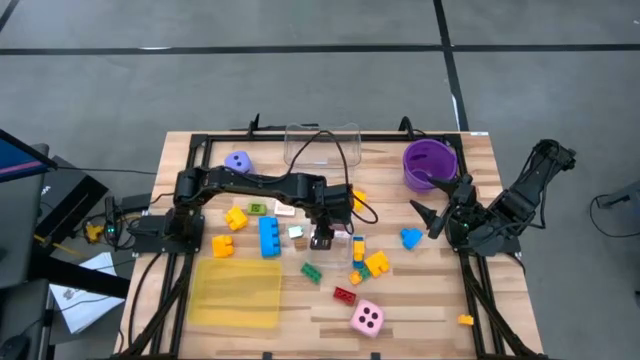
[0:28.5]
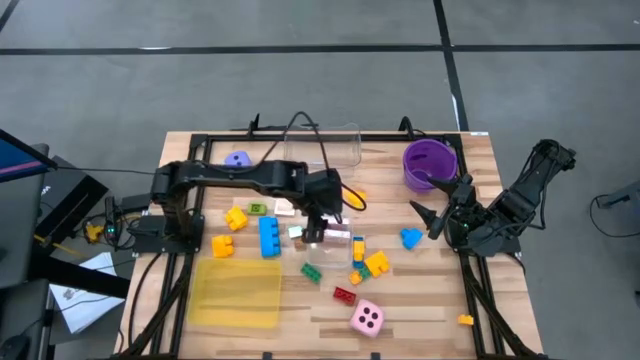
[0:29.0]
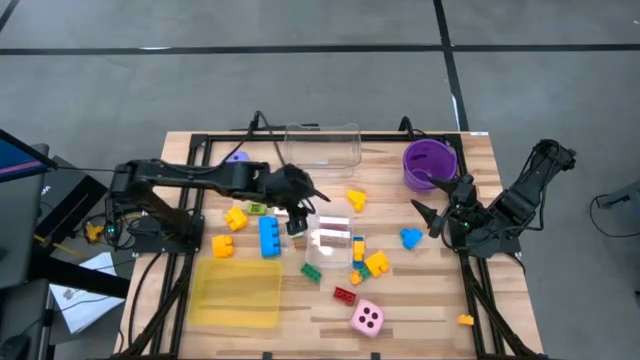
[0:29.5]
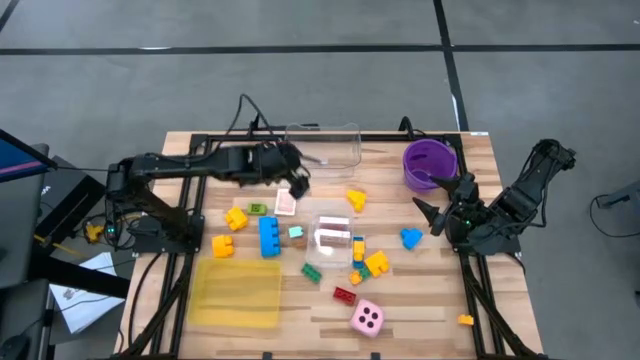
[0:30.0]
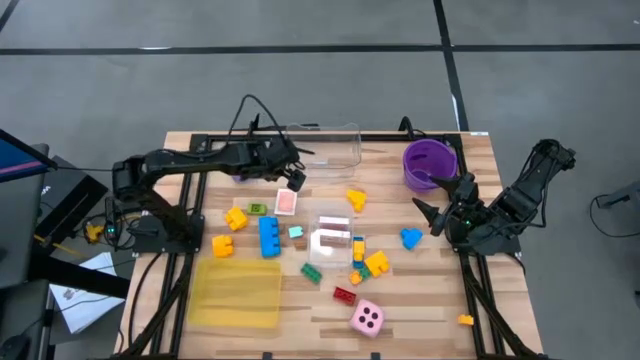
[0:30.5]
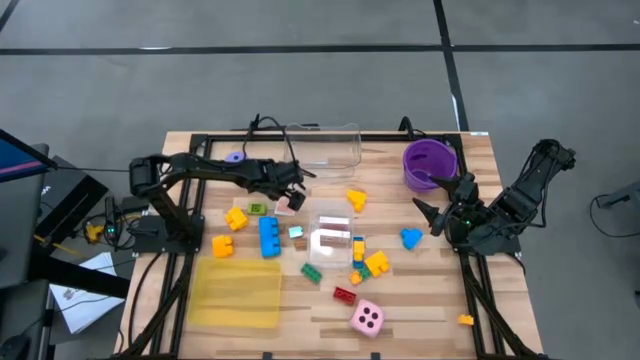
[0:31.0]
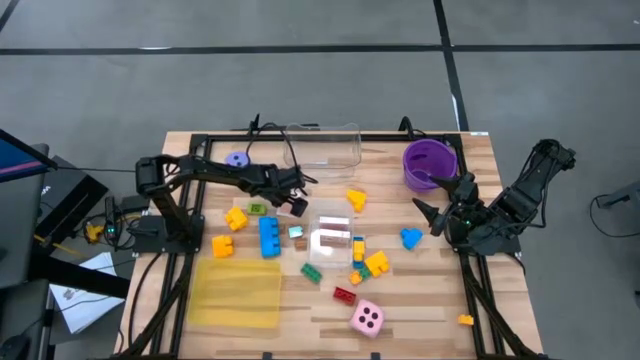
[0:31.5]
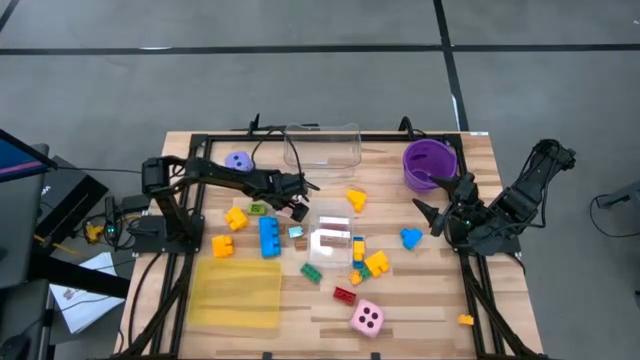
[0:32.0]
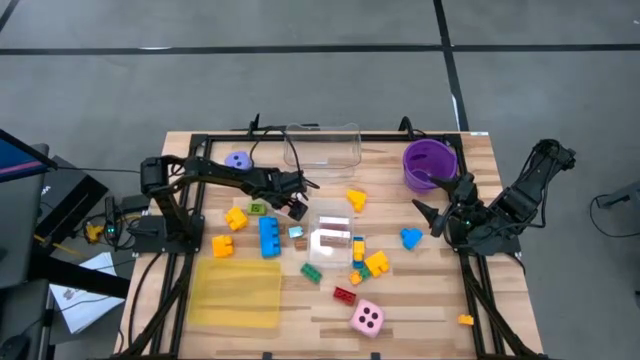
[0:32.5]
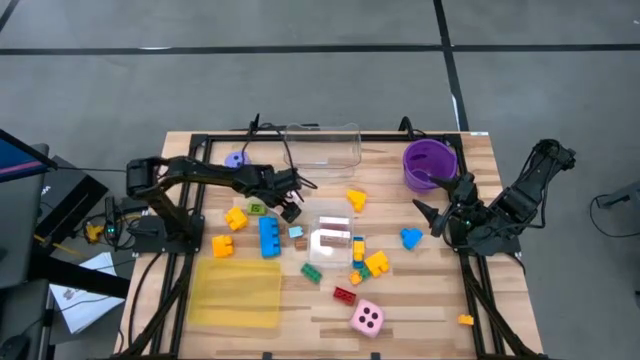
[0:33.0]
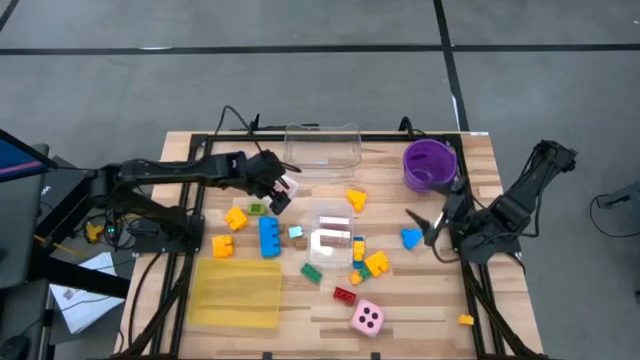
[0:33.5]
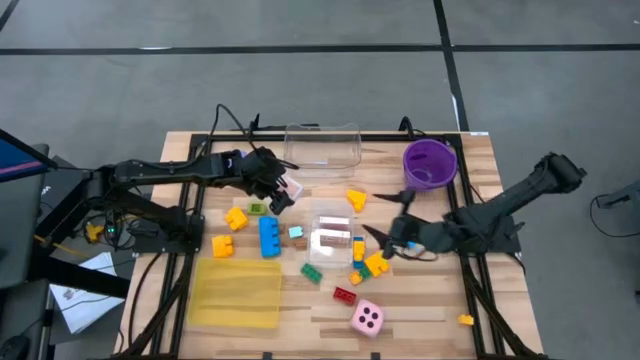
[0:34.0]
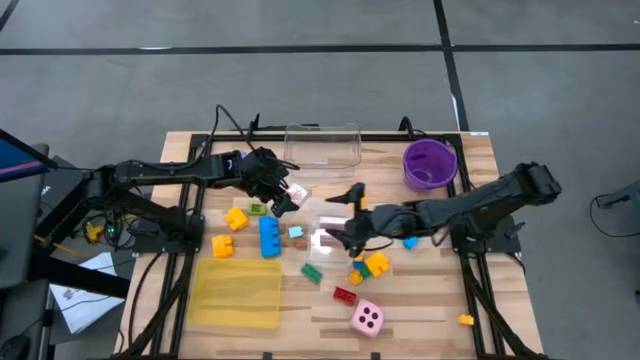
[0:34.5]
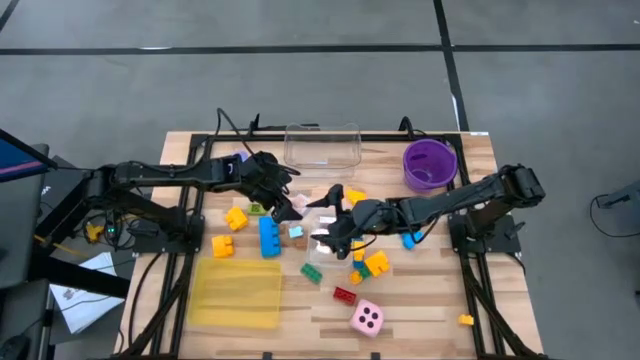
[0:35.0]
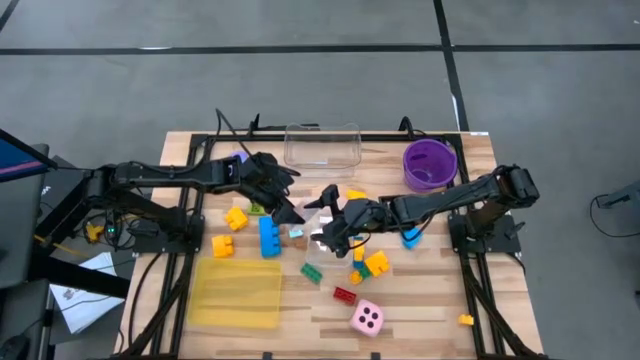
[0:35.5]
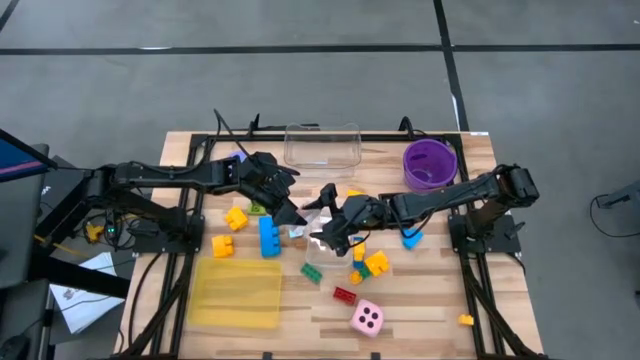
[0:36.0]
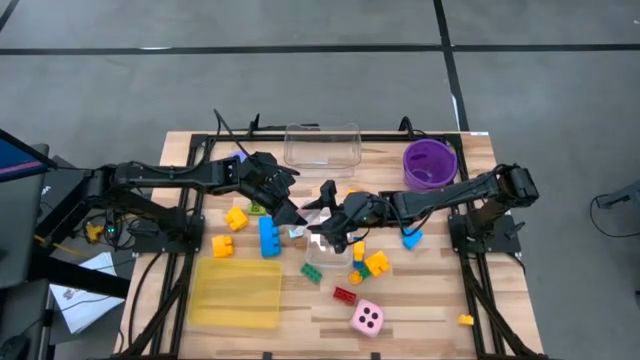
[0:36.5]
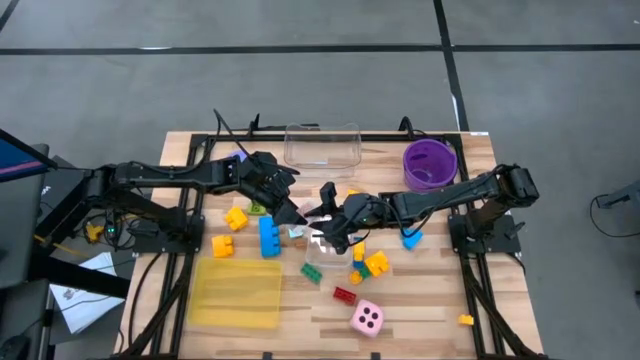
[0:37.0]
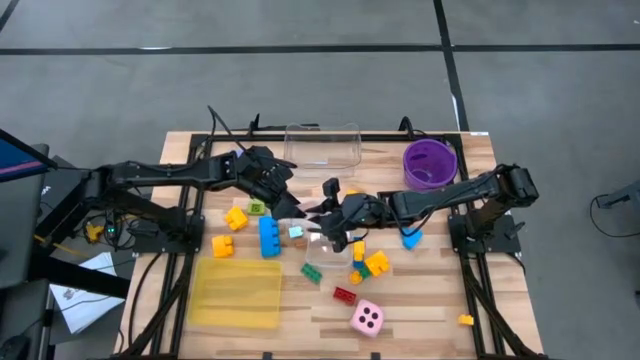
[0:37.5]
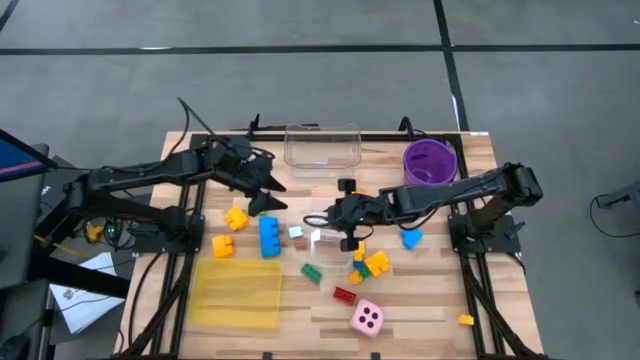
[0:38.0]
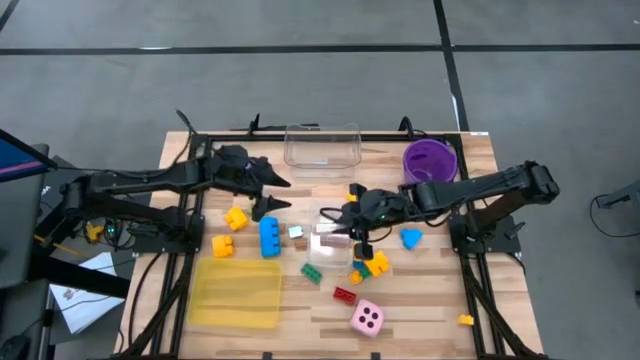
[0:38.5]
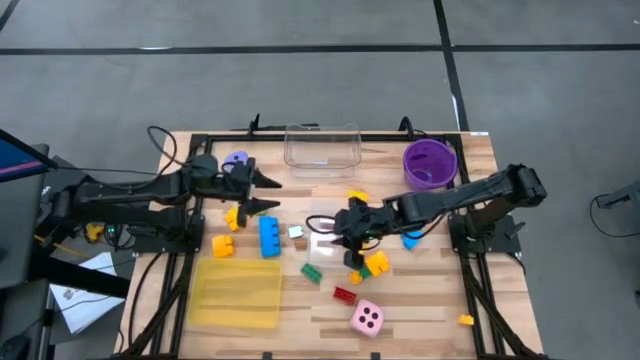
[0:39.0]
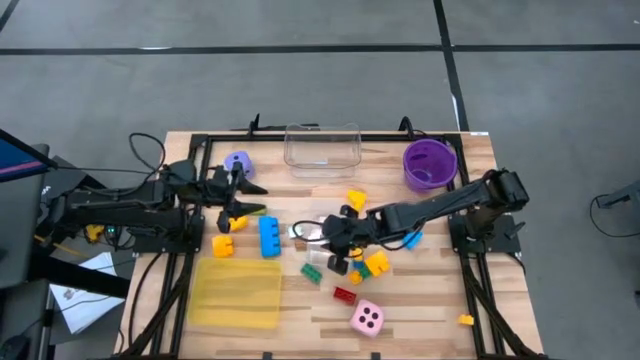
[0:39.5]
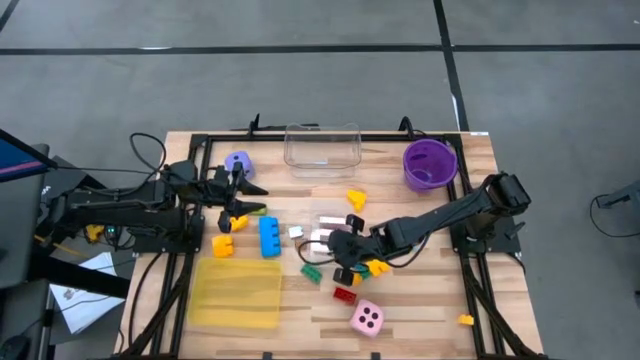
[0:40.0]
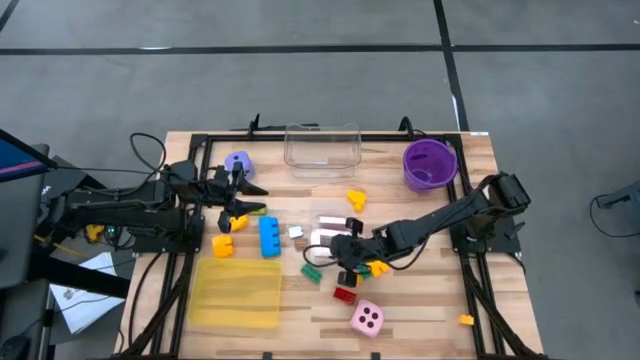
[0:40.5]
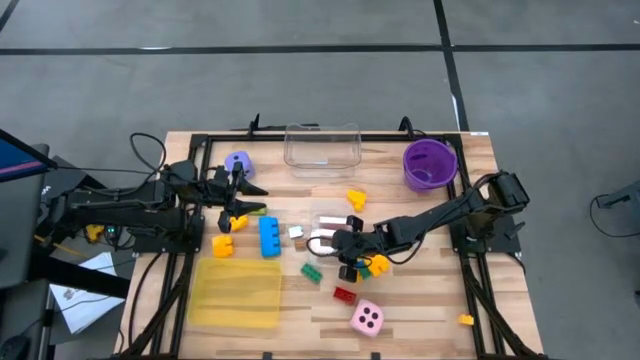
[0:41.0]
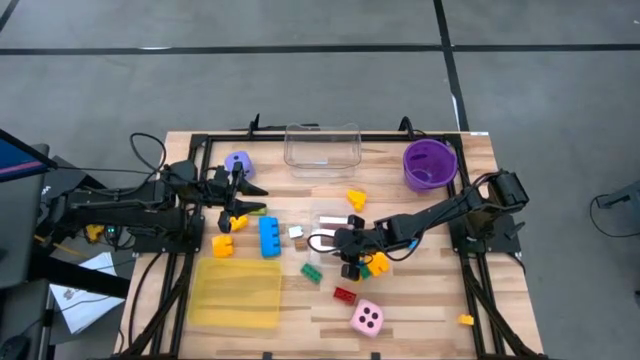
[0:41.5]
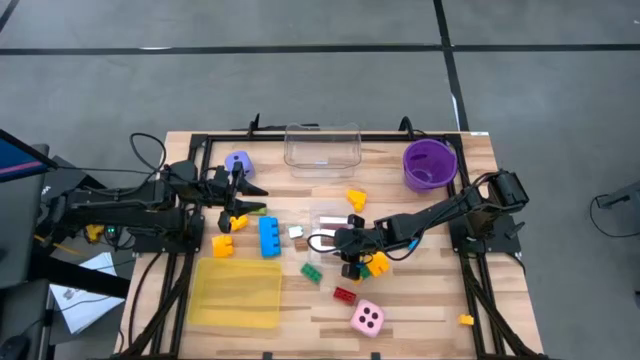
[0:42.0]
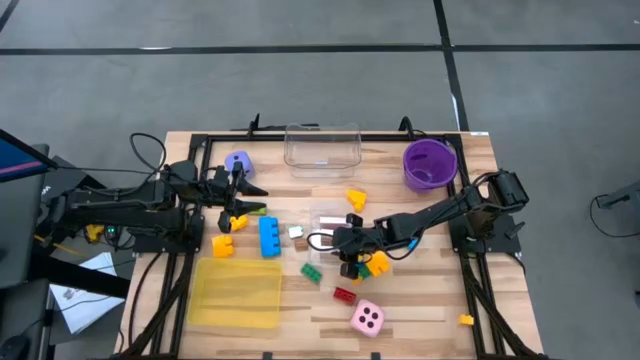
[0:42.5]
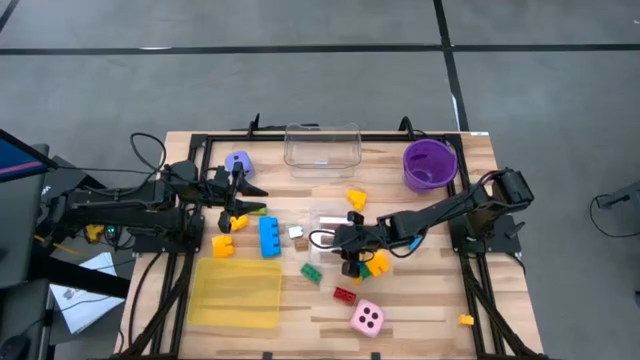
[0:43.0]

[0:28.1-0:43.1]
Task: Pick & Place Toys
Put the orange playing card box into the bottom transparent bin

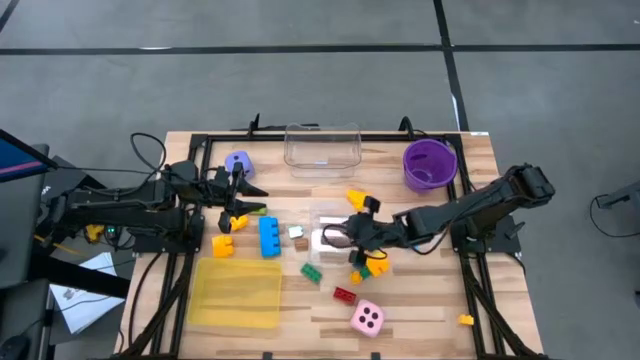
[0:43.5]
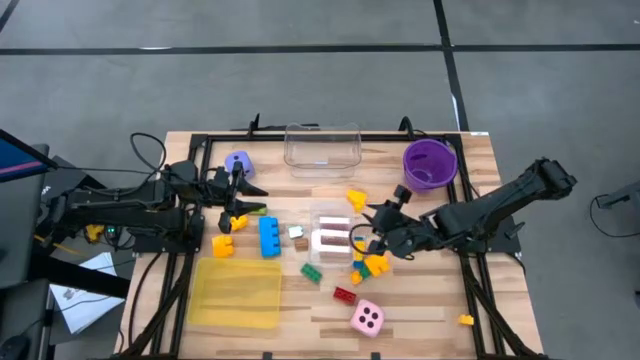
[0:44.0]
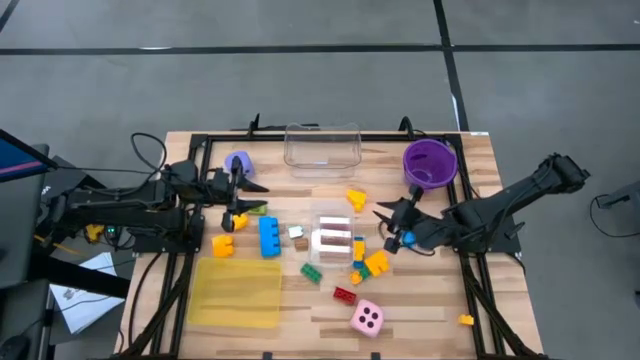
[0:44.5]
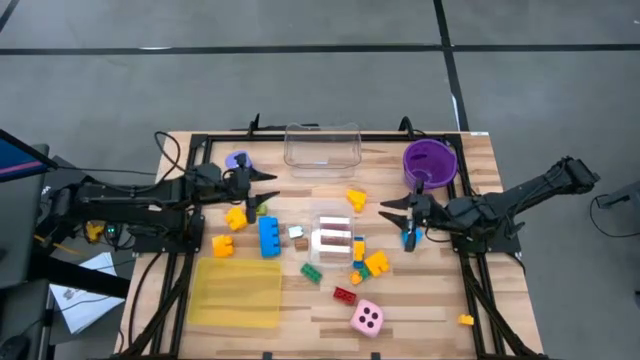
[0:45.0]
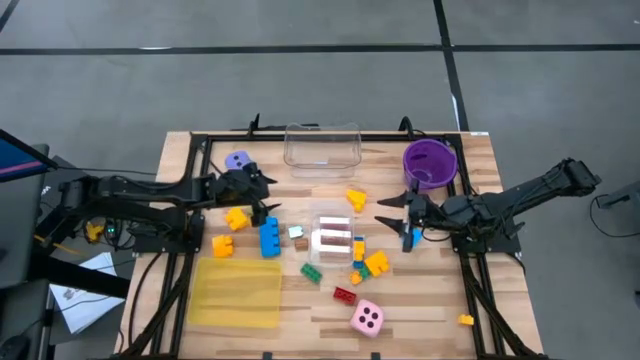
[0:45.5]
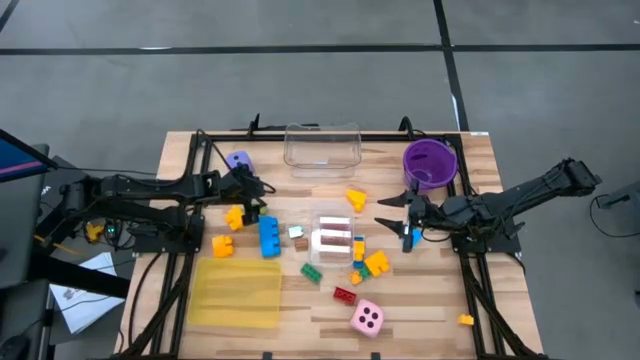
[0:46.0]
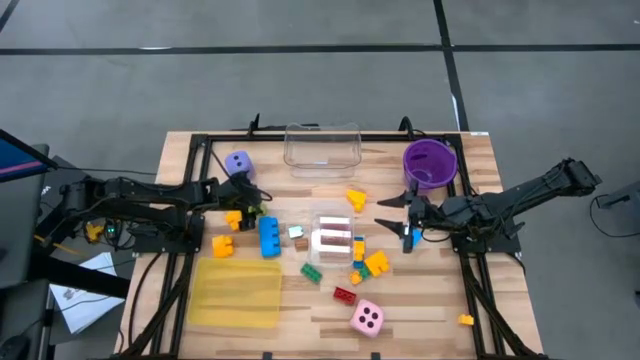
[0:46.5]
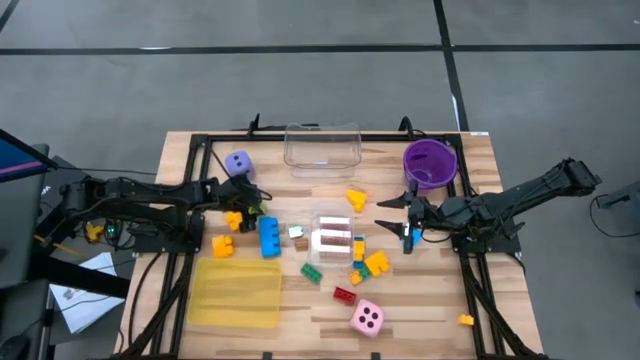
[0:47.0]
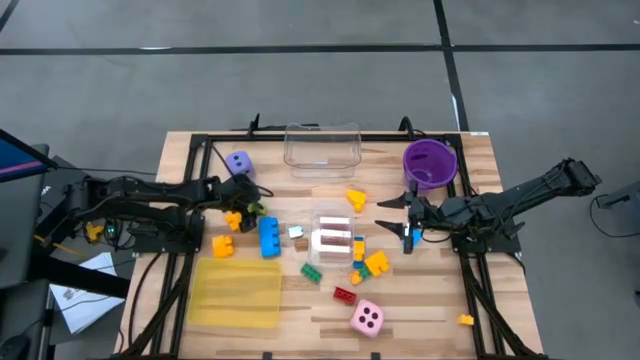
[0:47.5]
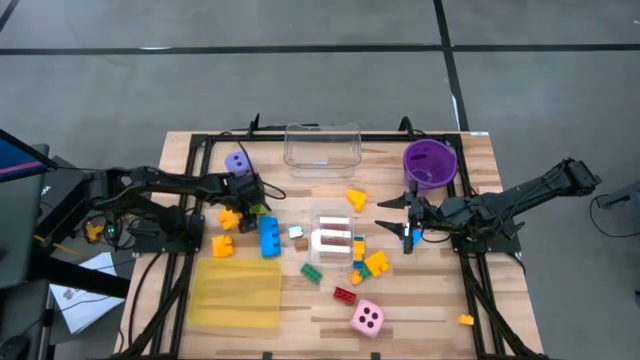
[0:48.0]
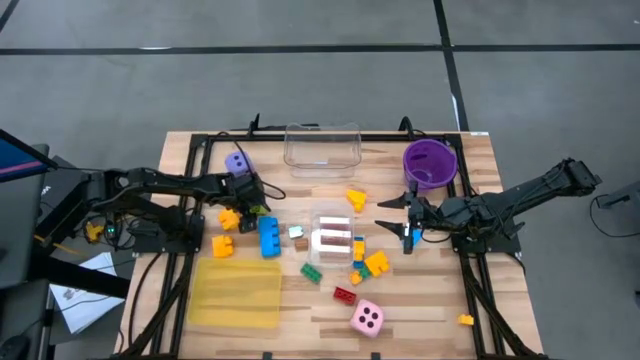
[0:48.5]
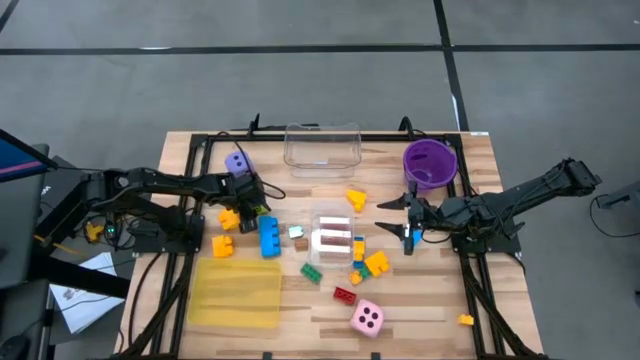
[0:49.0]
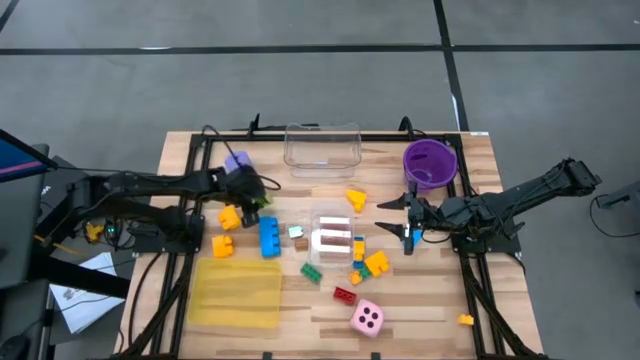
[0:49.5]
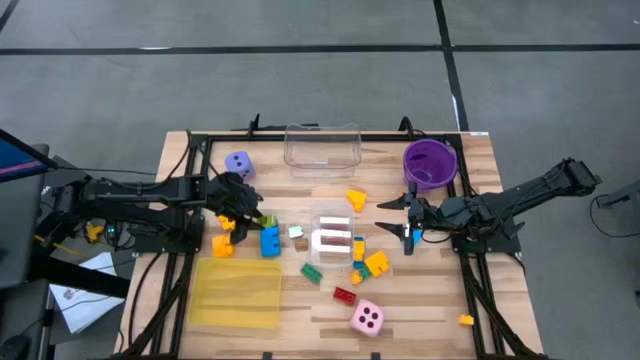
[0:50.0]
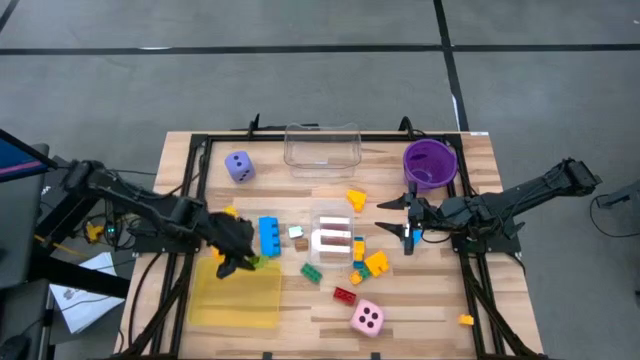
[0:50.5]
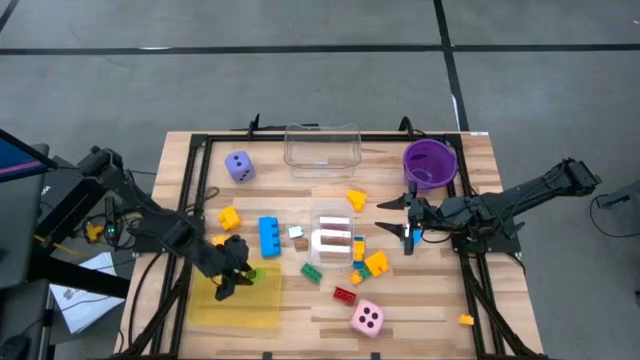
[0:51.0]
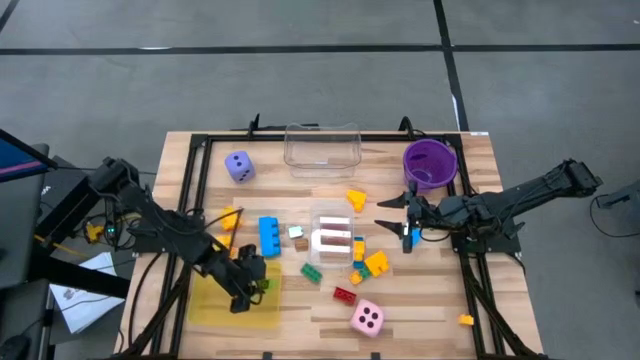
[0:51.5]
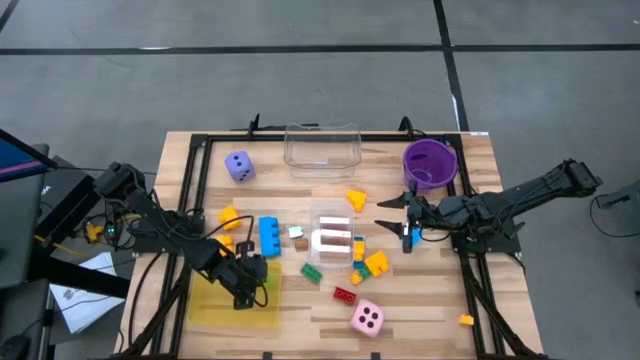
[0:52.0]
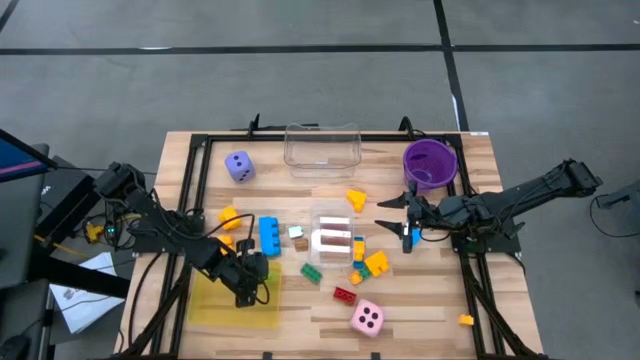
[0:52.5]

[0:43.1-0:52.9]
Put the light green game piece into the yellow bin
